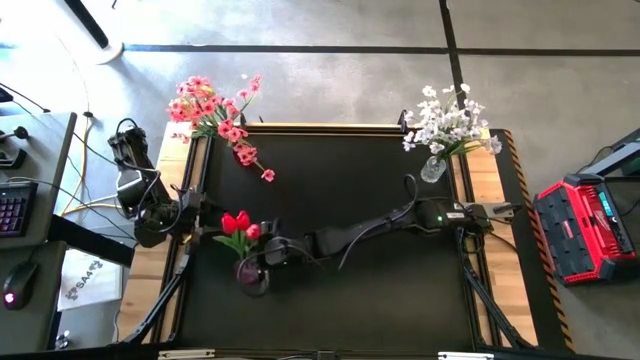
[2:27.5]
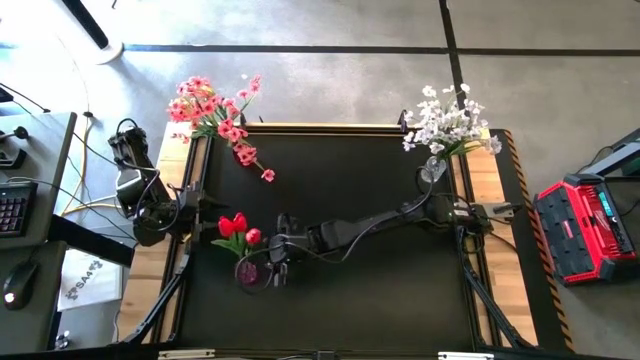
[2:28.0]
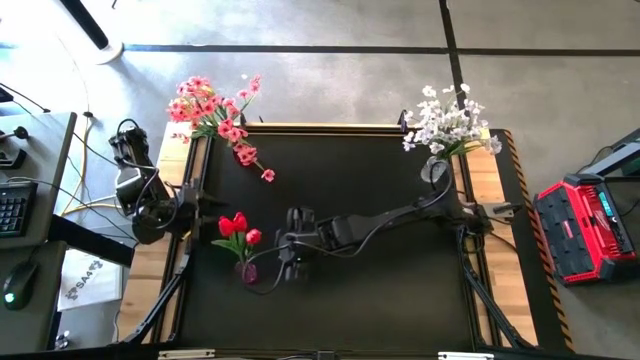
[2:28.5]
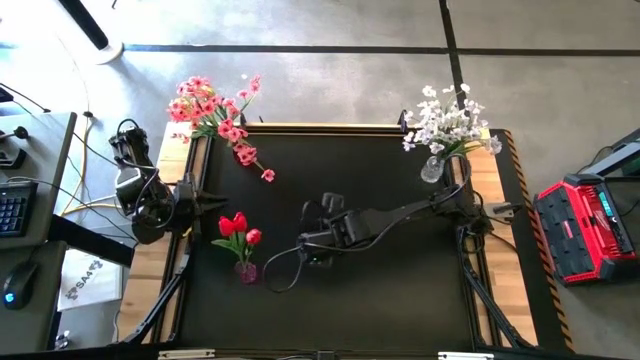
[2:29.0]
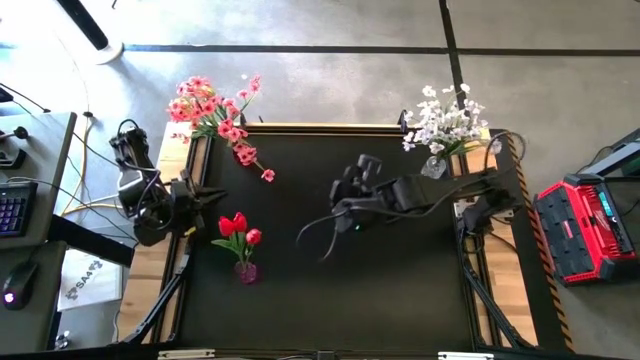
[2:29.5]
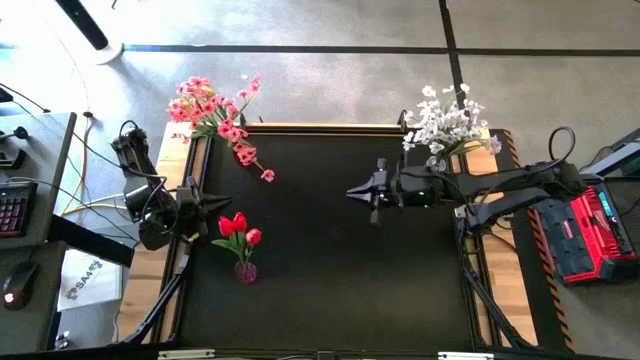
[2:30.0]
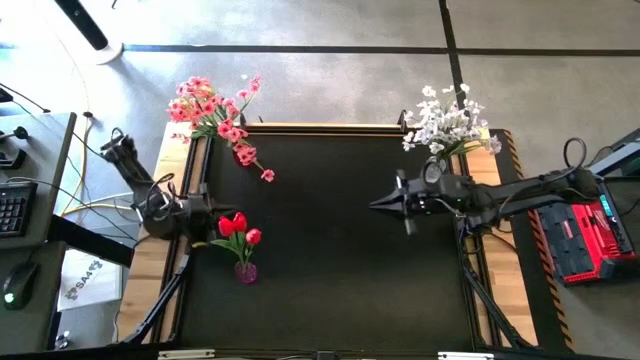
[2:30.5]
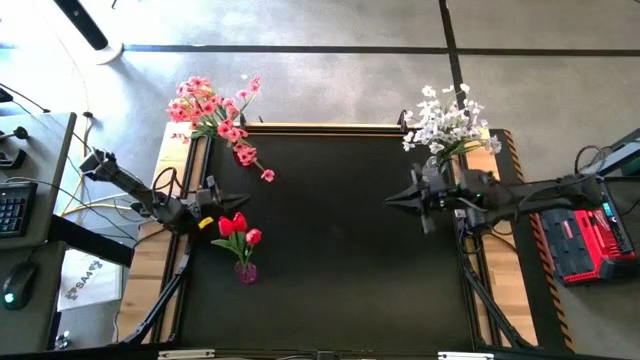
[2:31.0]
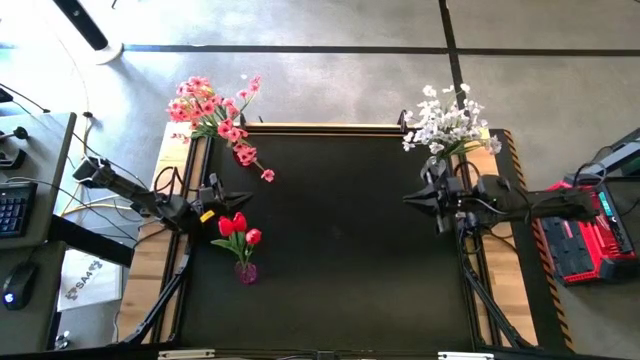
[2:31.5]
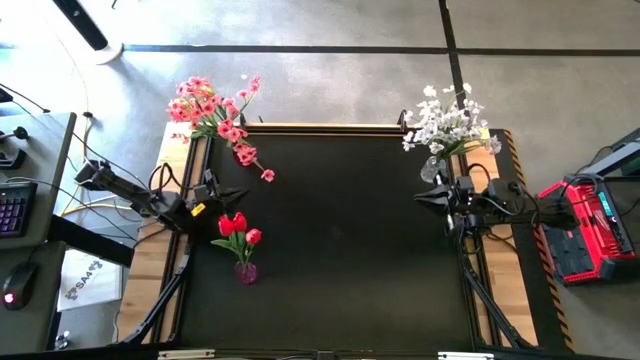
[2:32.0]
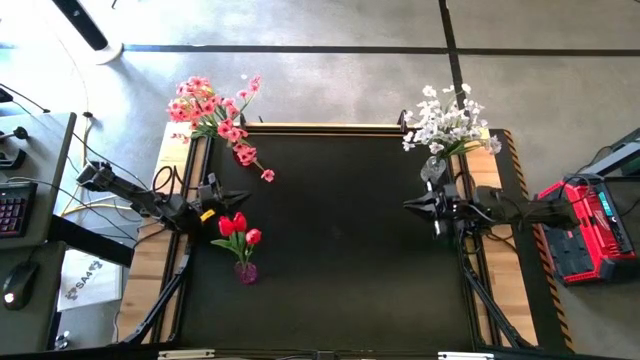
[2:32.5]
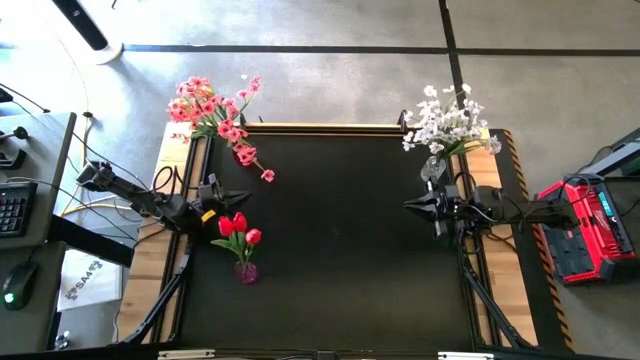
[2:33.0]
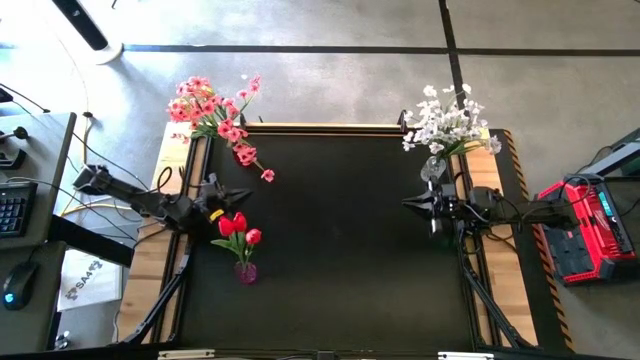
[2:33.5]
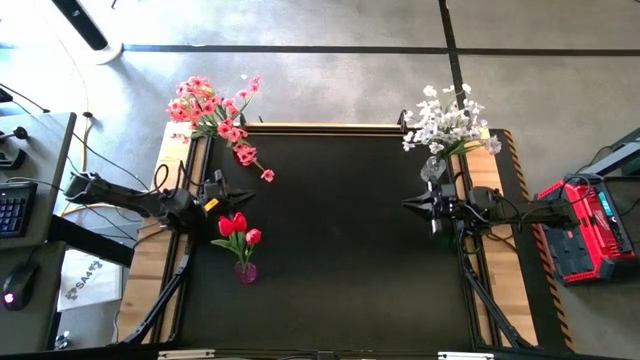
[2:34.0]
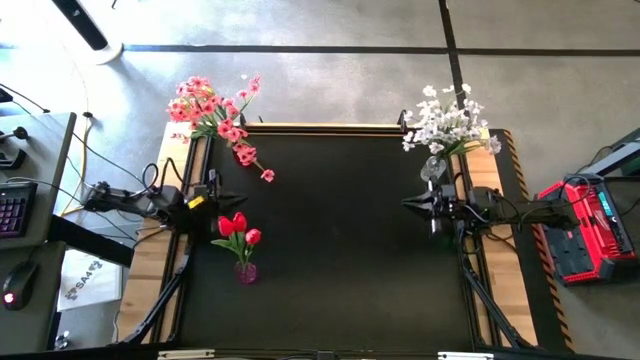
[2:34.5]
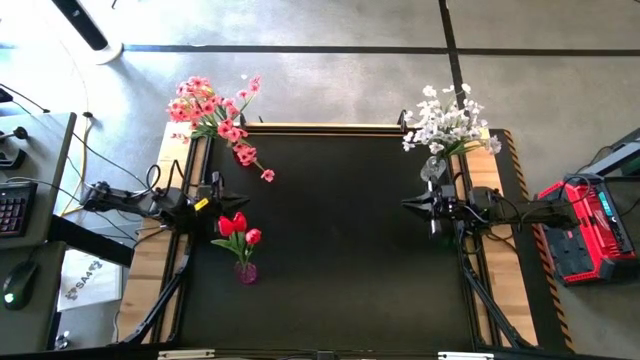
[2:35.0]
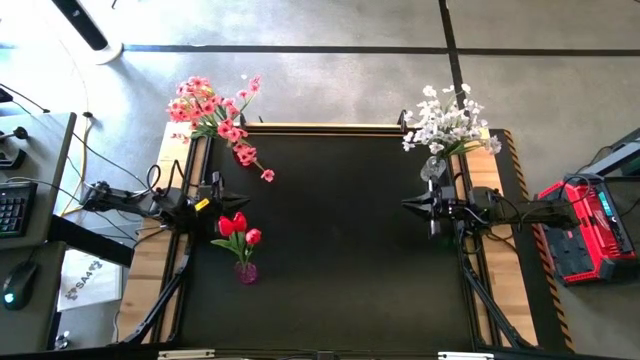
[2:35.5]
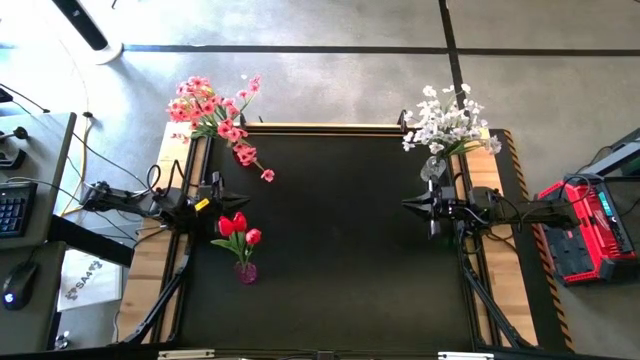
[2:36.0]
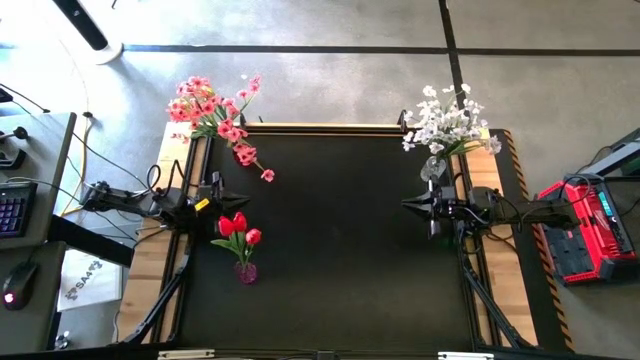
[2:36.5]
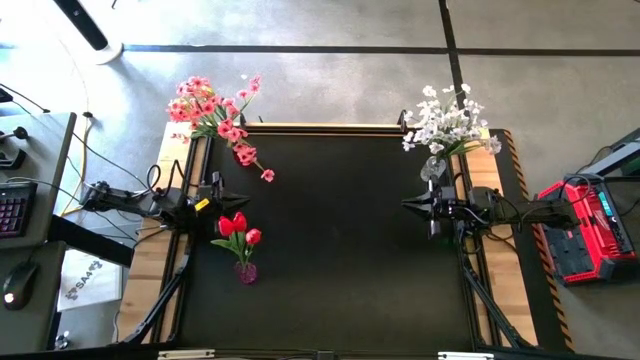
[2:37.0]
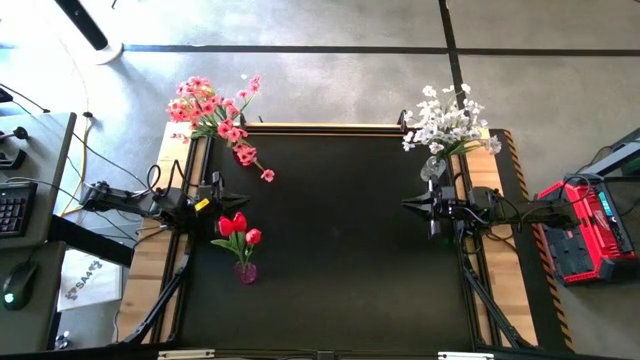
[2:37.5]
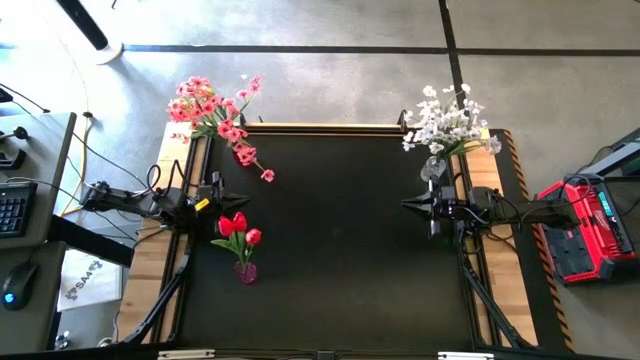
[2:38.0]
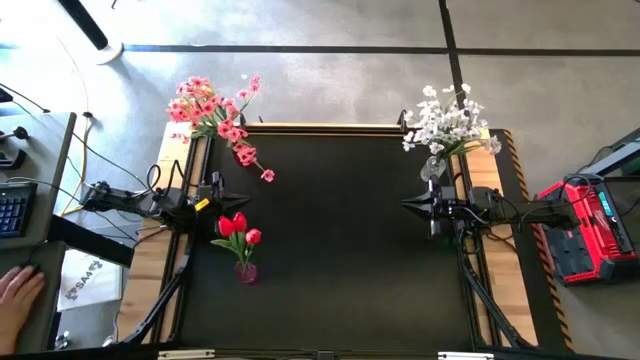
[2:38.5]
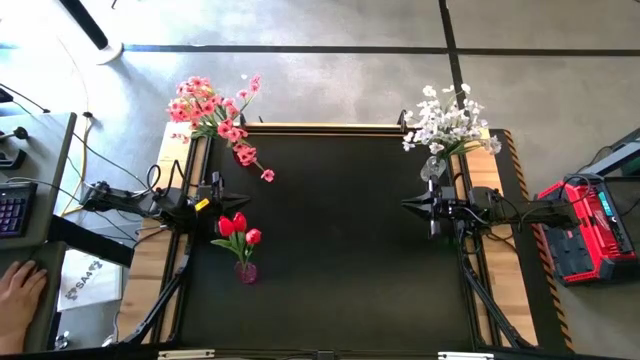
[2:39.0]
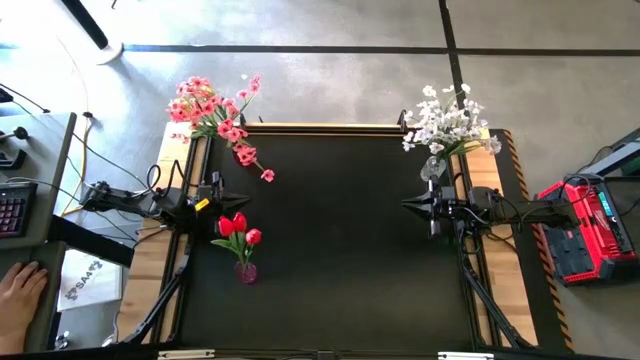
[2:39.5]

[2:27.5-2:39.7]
Task: Sort flowers into vase by color
Return to Home Position

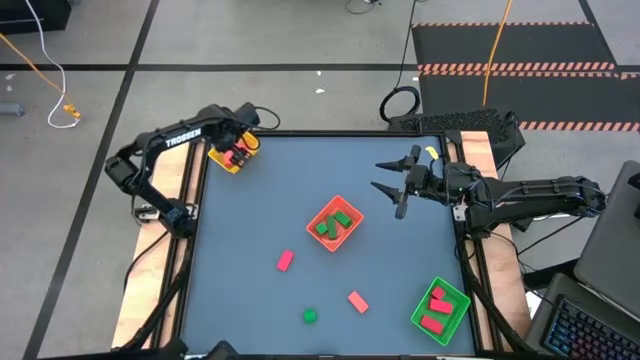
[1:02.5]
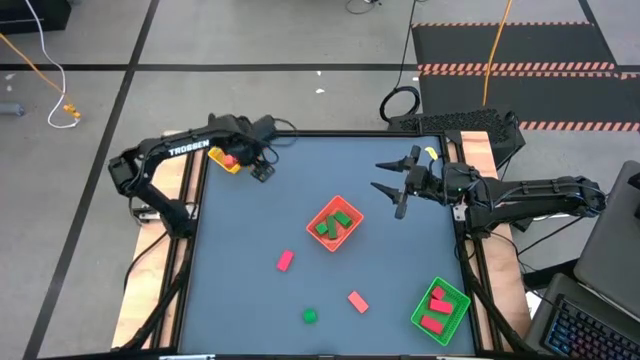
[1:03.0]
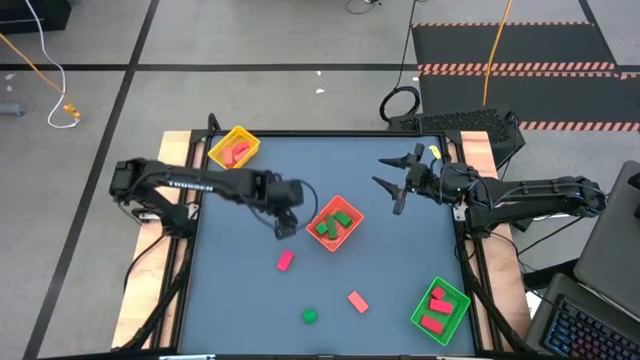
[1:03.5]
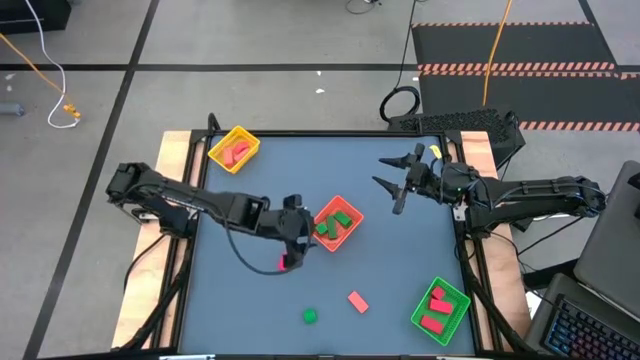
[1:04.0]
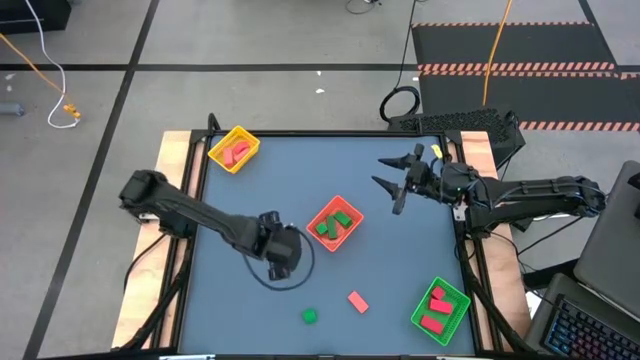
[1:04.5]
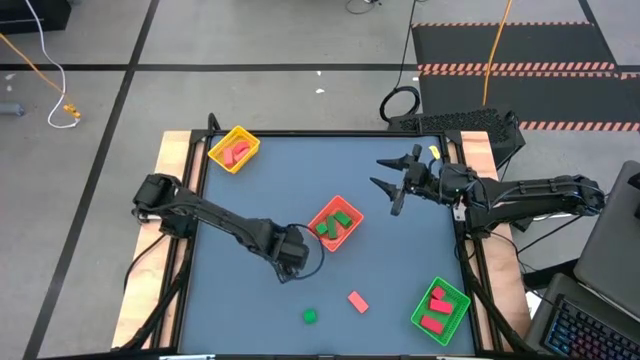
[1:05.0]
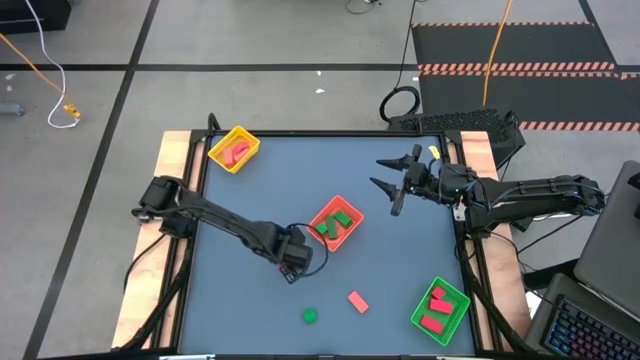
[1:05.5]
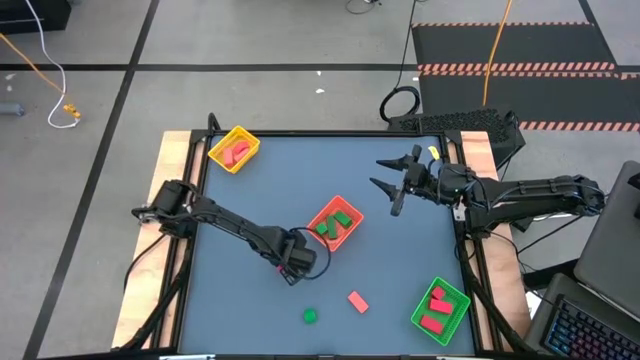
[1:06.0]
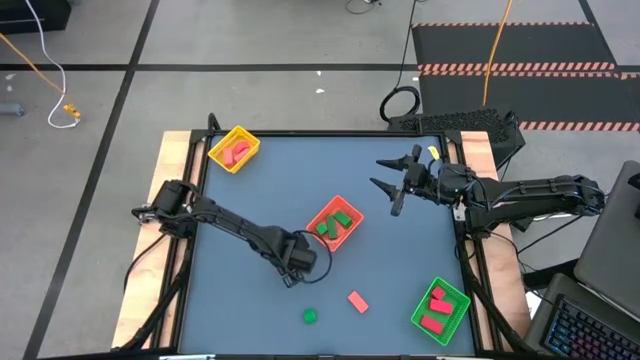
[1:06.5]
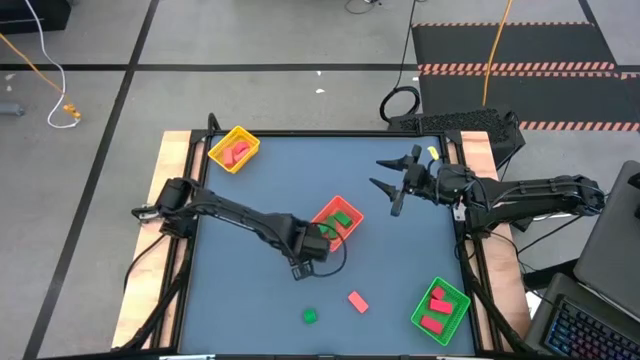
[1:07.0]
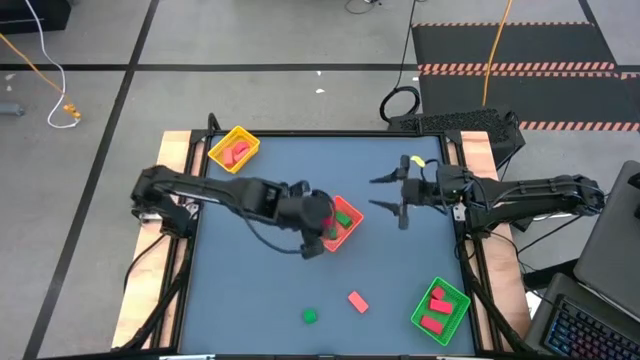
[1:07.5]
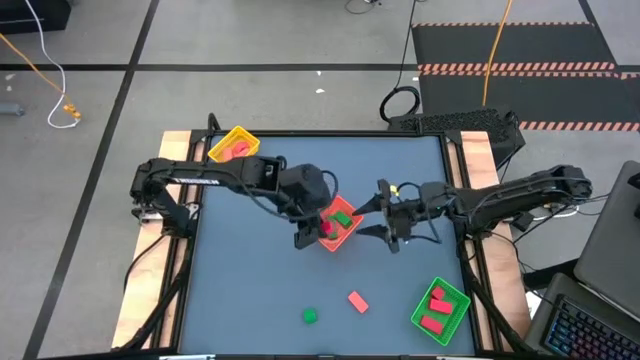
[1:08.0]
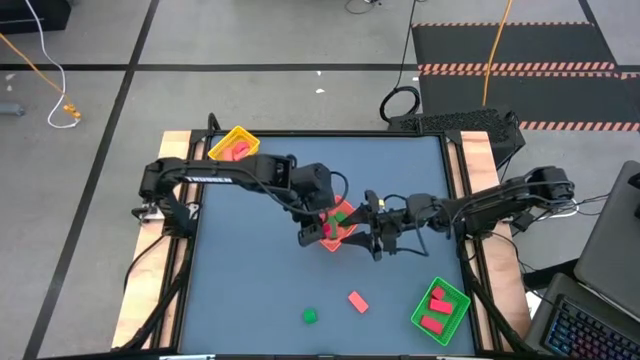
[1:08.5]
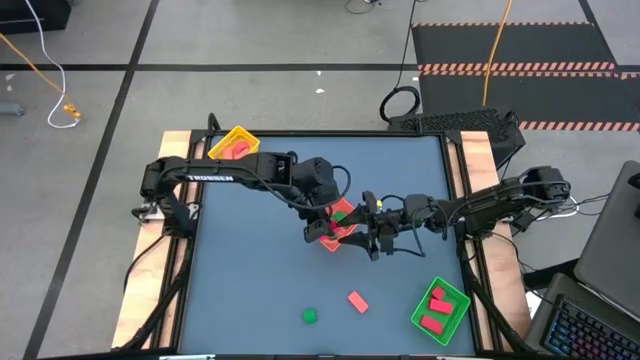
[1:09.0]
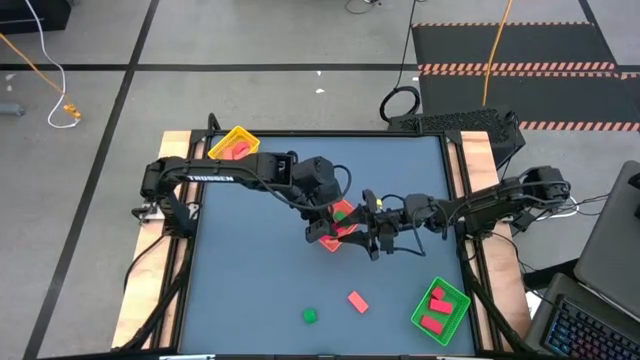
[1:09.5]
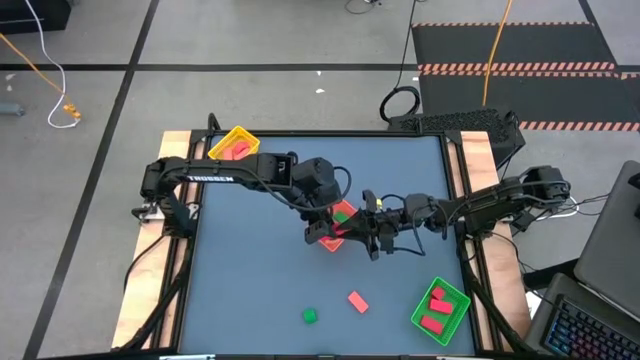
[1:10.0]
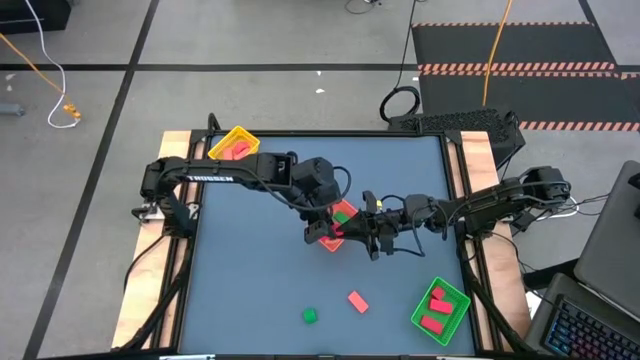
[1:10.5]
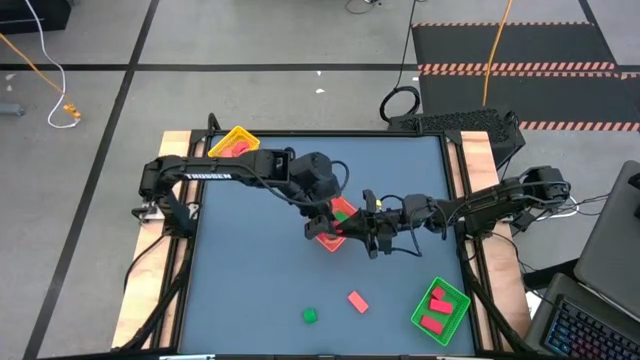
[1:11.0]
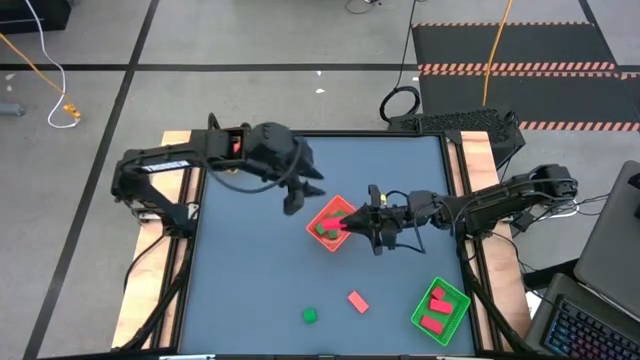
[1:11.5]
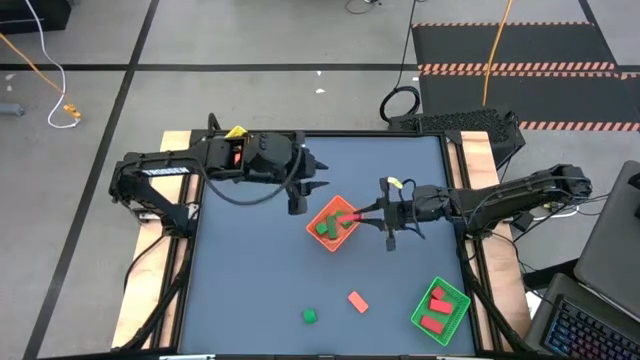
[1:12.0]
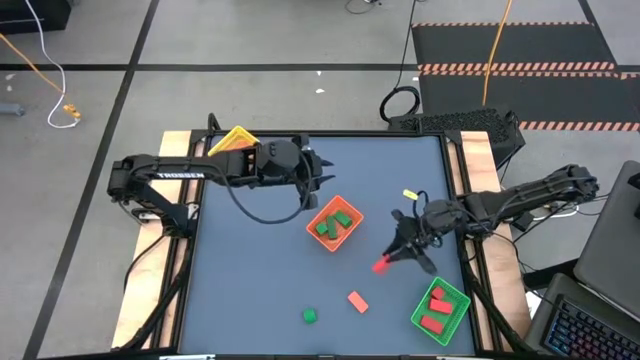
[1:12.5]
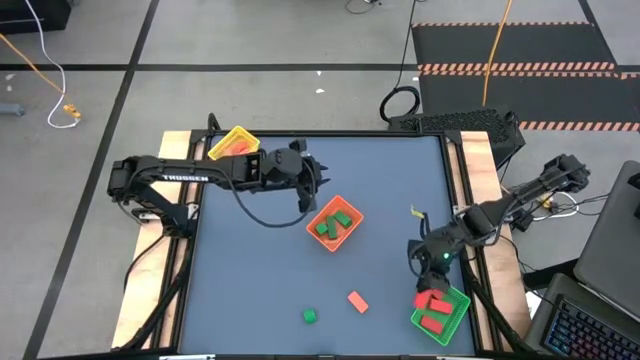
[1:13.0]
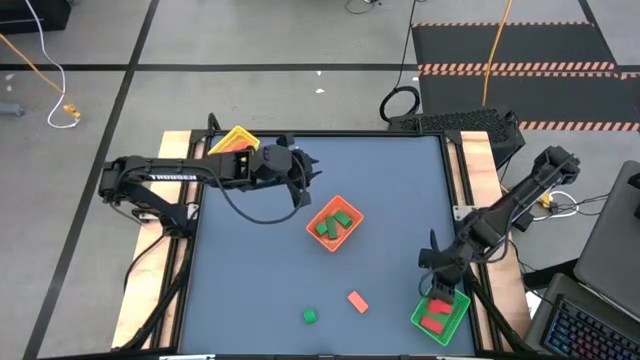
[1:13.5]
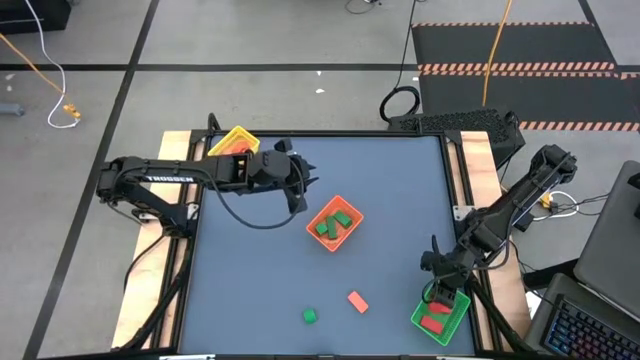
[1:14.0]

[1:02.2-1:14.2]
Task: Sort & place blocks by color
Put the red block into the green bin
